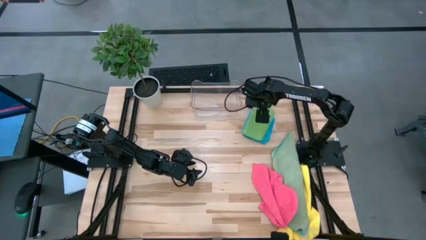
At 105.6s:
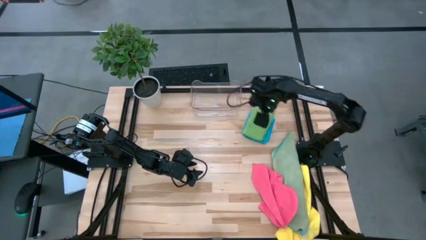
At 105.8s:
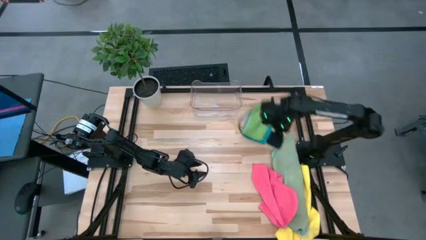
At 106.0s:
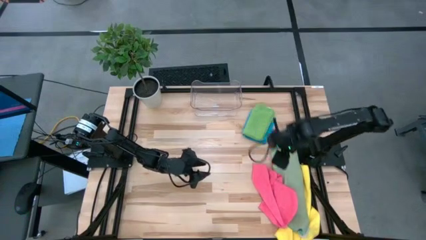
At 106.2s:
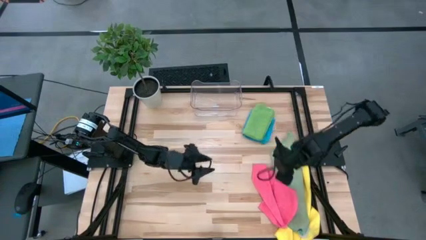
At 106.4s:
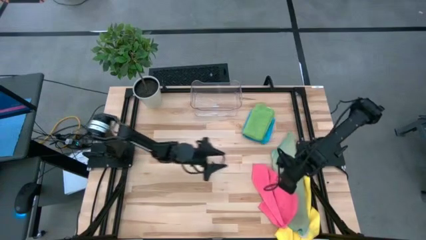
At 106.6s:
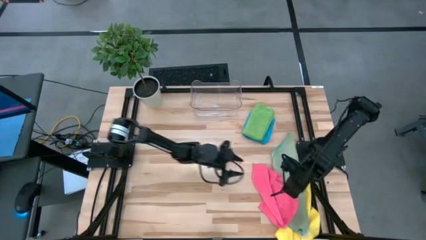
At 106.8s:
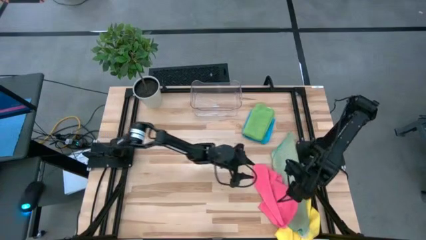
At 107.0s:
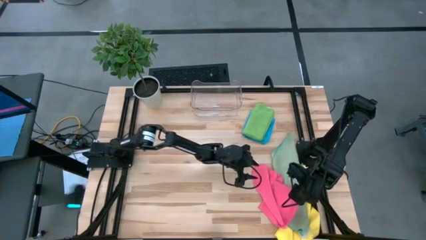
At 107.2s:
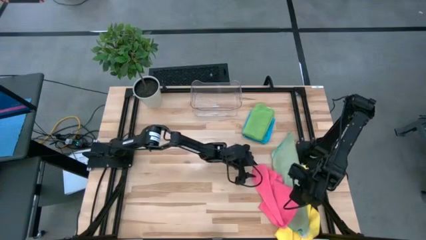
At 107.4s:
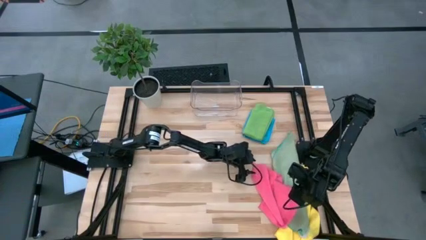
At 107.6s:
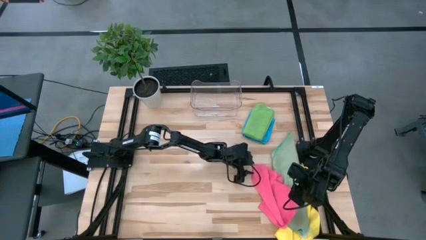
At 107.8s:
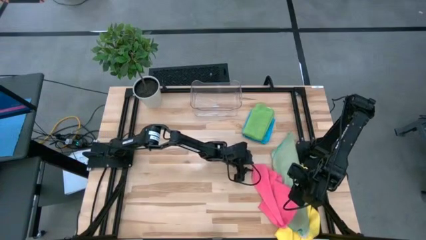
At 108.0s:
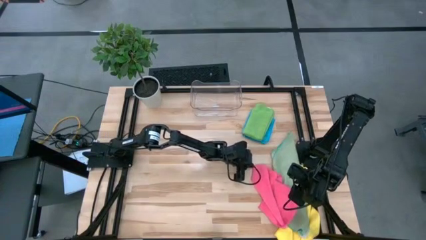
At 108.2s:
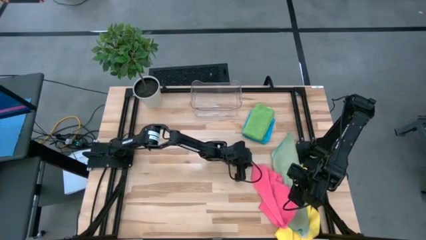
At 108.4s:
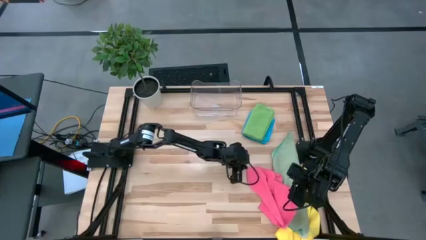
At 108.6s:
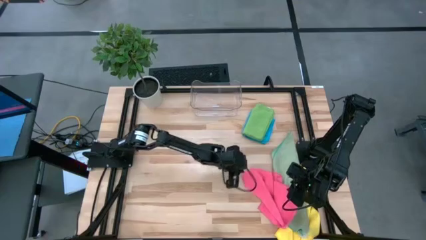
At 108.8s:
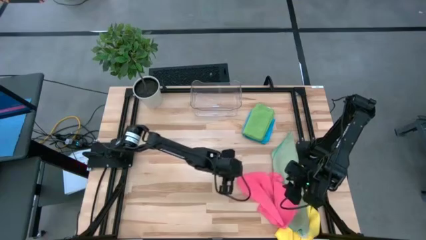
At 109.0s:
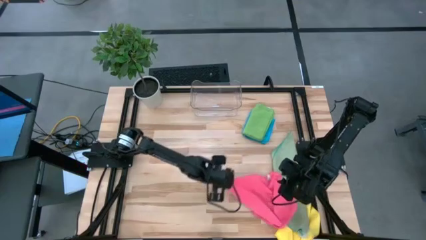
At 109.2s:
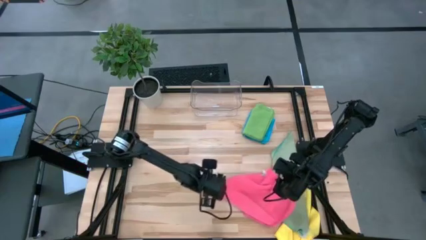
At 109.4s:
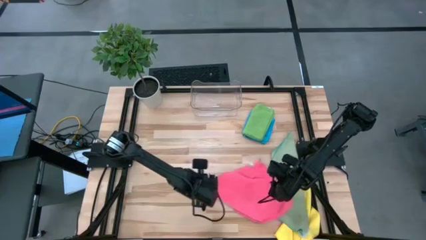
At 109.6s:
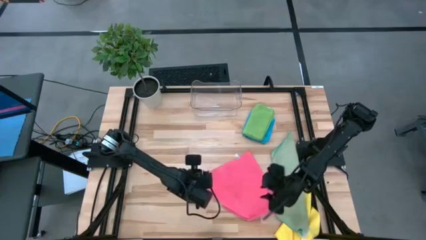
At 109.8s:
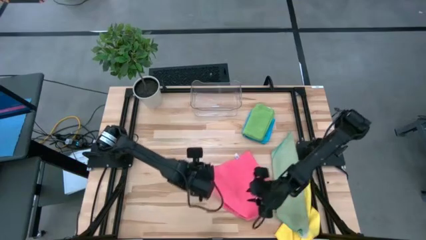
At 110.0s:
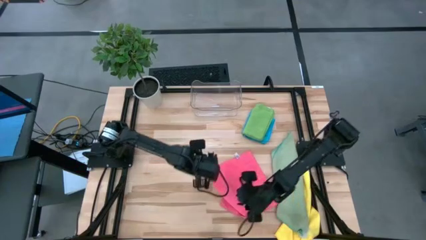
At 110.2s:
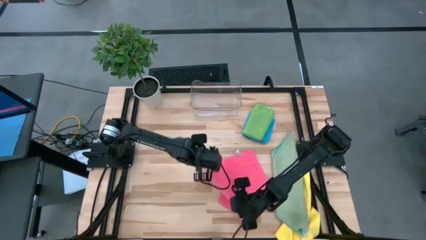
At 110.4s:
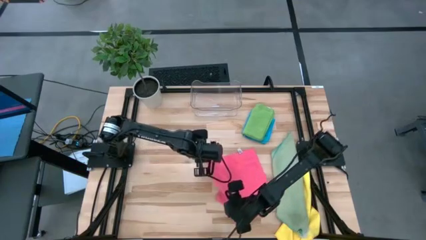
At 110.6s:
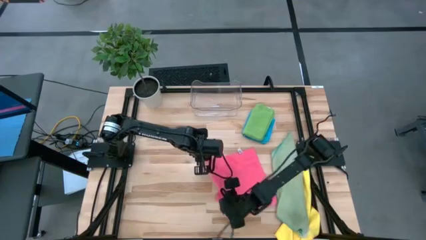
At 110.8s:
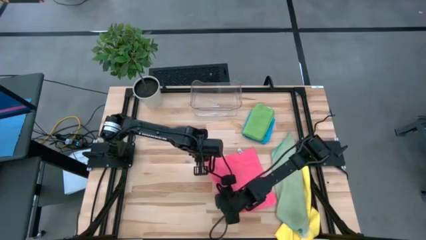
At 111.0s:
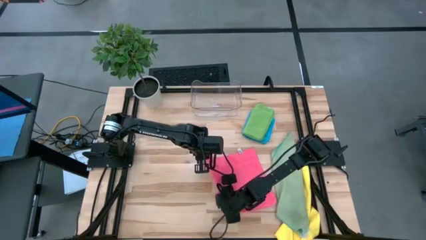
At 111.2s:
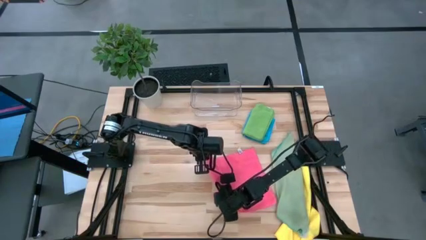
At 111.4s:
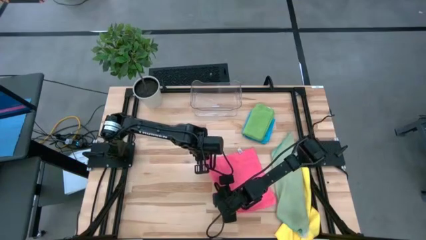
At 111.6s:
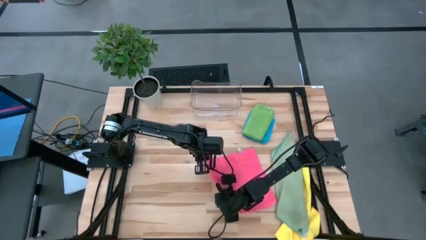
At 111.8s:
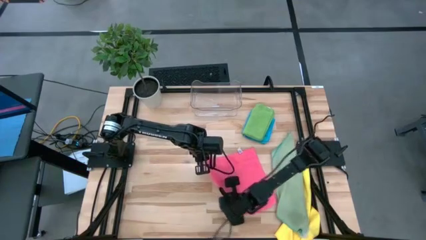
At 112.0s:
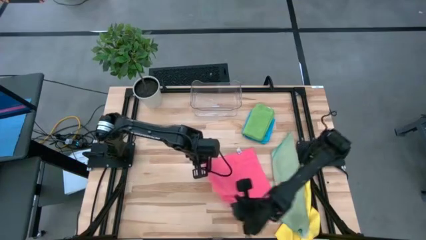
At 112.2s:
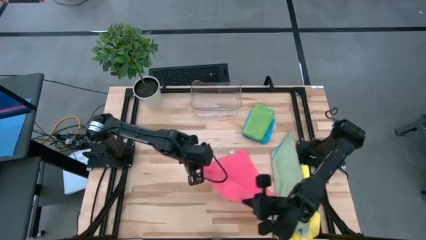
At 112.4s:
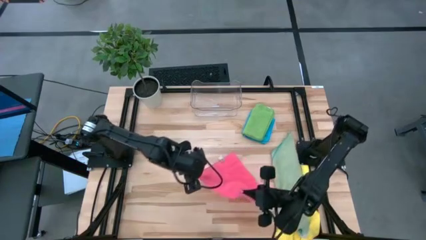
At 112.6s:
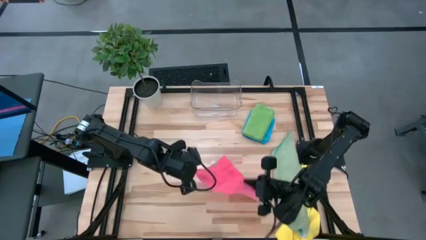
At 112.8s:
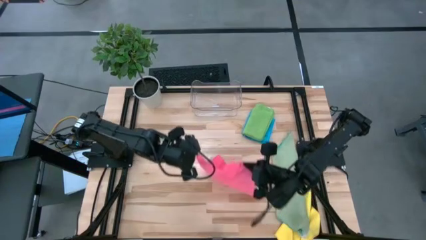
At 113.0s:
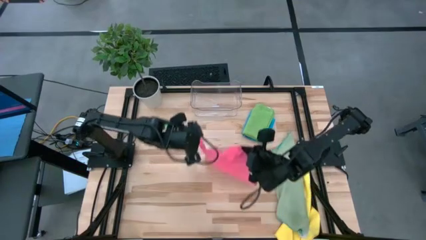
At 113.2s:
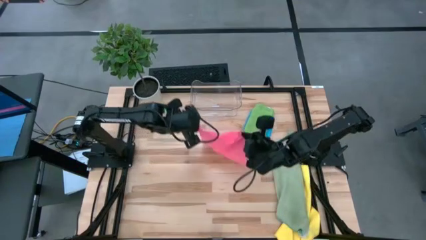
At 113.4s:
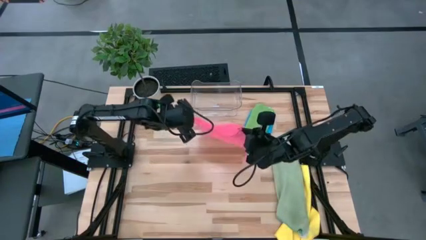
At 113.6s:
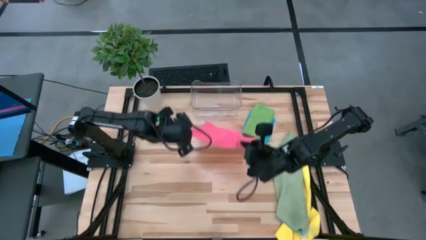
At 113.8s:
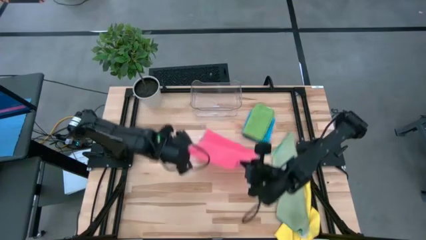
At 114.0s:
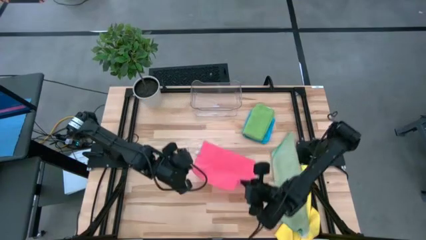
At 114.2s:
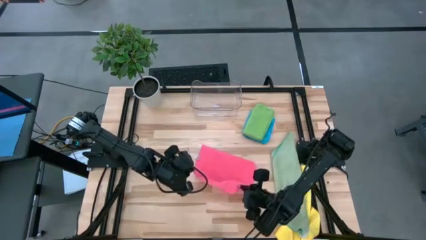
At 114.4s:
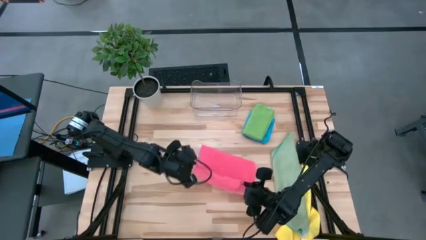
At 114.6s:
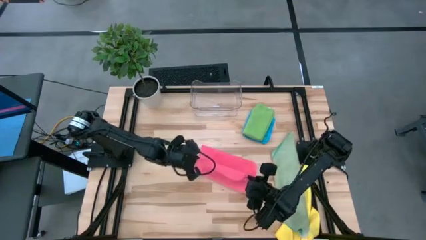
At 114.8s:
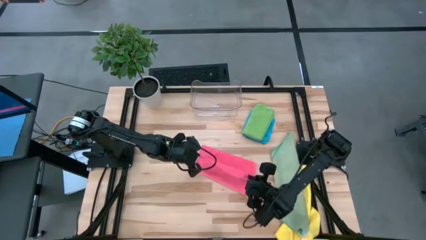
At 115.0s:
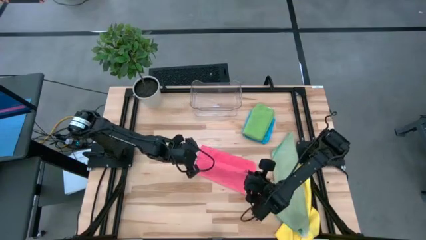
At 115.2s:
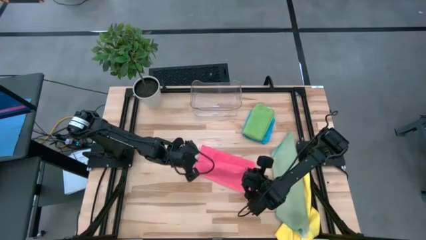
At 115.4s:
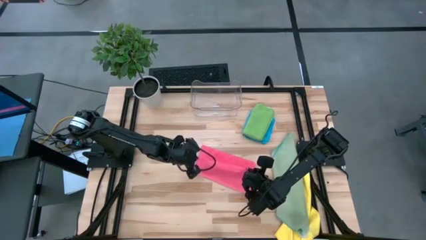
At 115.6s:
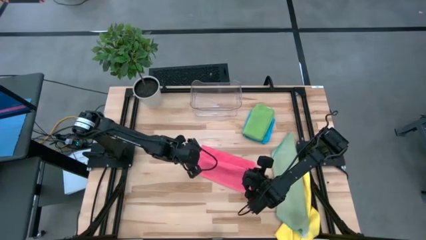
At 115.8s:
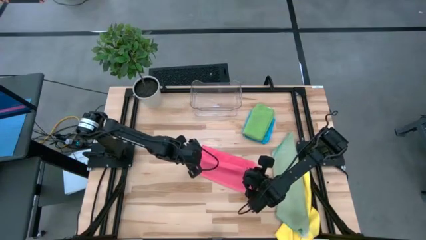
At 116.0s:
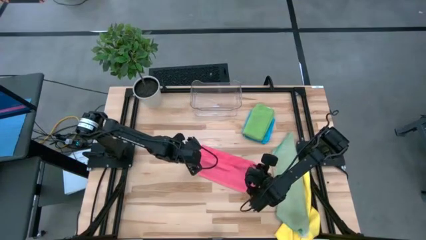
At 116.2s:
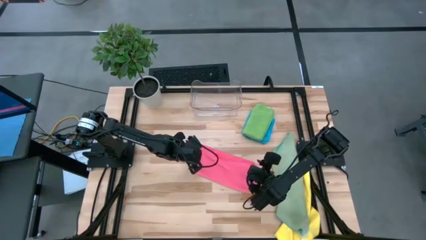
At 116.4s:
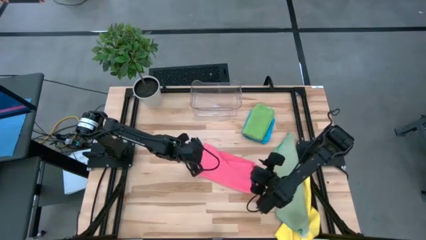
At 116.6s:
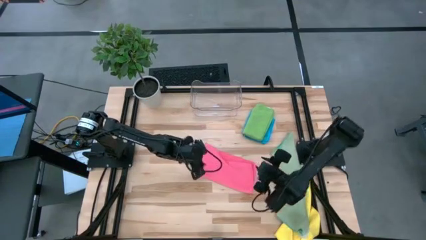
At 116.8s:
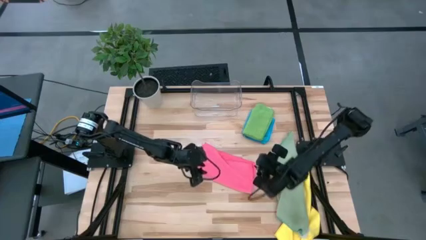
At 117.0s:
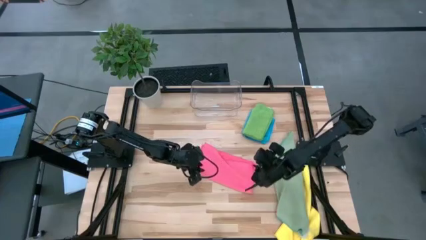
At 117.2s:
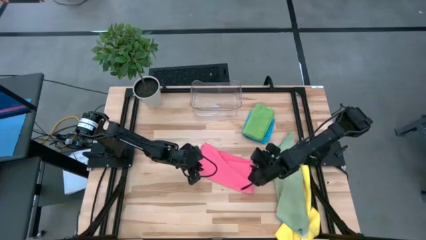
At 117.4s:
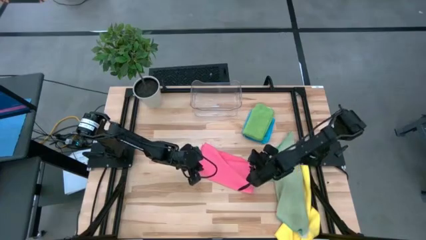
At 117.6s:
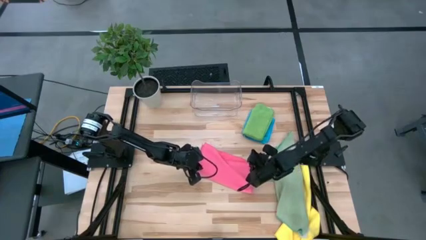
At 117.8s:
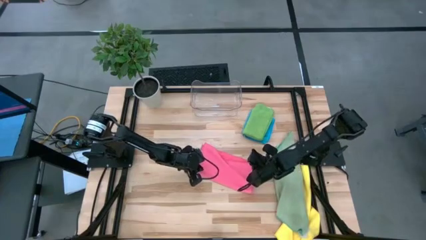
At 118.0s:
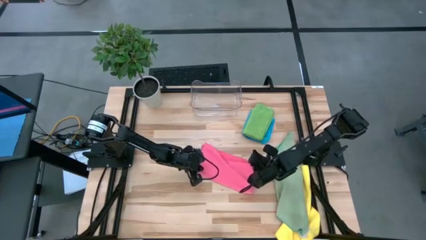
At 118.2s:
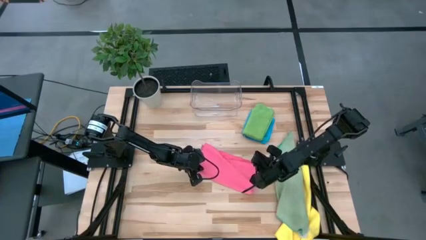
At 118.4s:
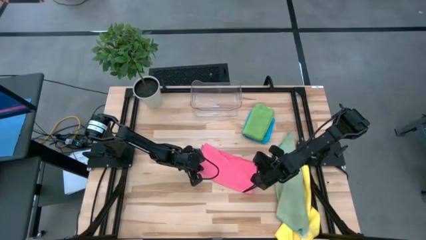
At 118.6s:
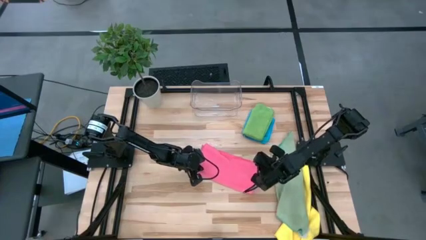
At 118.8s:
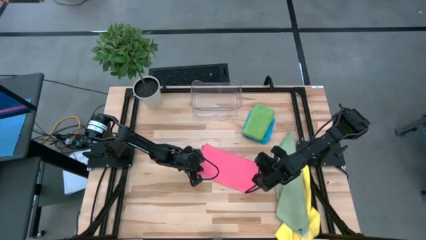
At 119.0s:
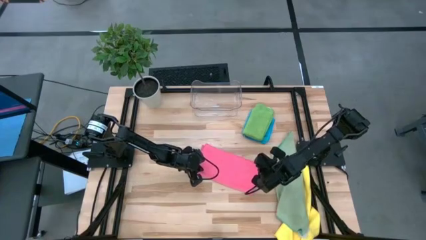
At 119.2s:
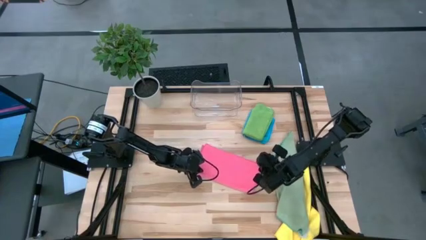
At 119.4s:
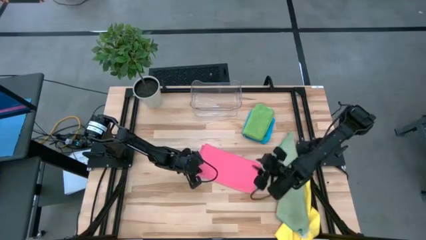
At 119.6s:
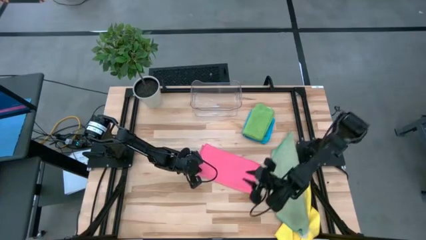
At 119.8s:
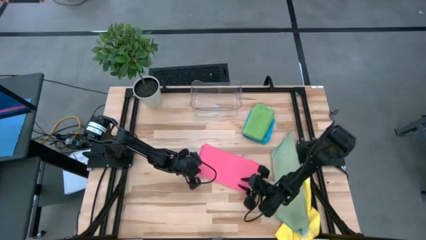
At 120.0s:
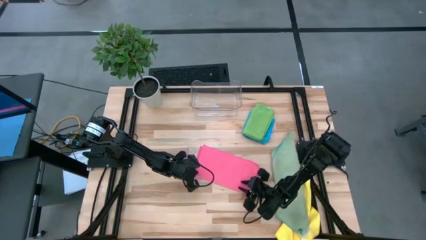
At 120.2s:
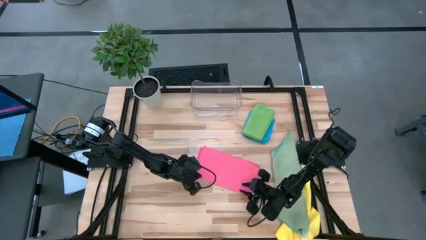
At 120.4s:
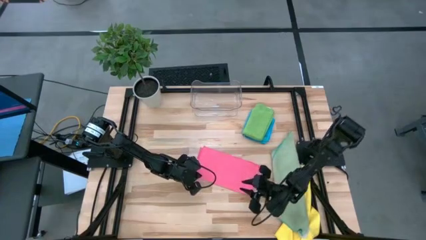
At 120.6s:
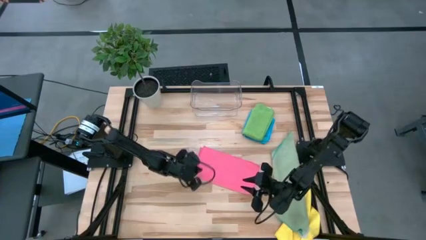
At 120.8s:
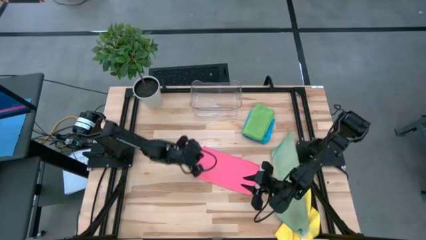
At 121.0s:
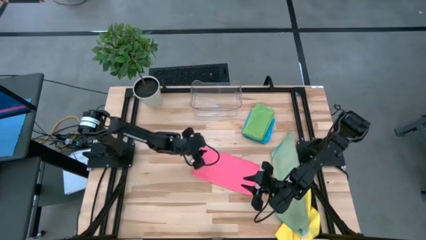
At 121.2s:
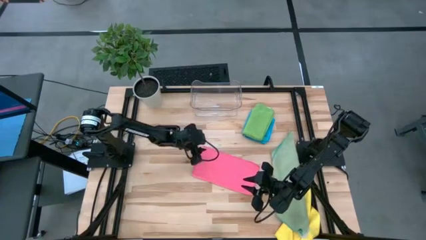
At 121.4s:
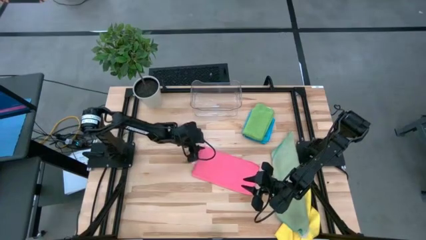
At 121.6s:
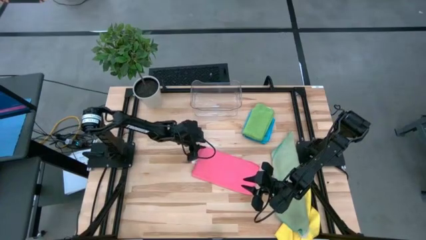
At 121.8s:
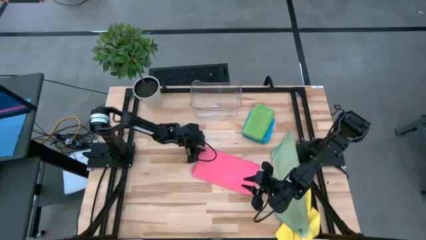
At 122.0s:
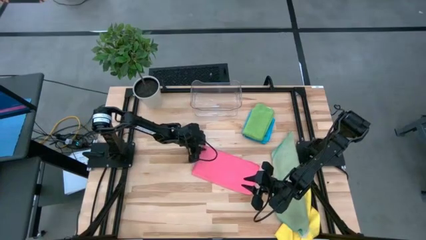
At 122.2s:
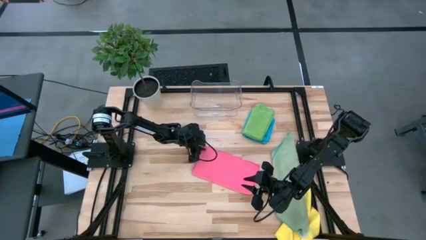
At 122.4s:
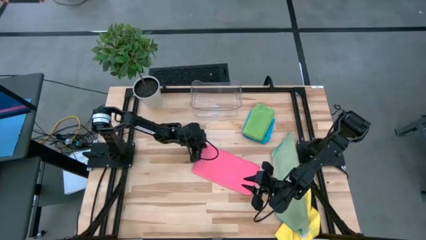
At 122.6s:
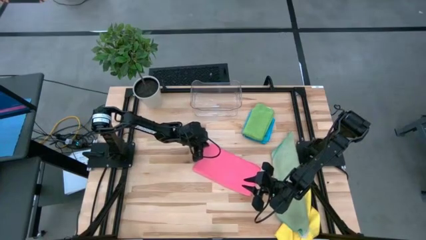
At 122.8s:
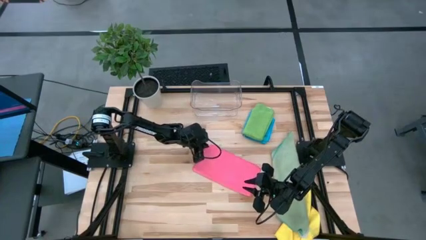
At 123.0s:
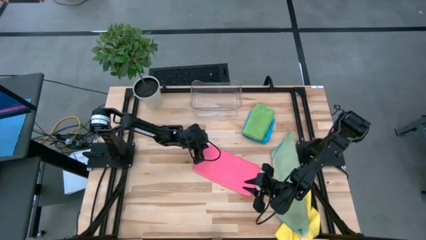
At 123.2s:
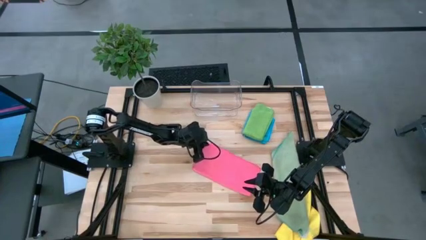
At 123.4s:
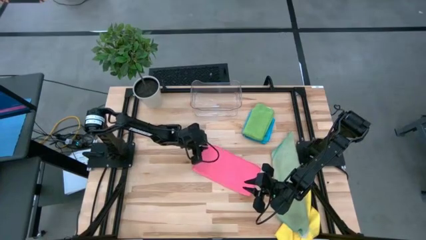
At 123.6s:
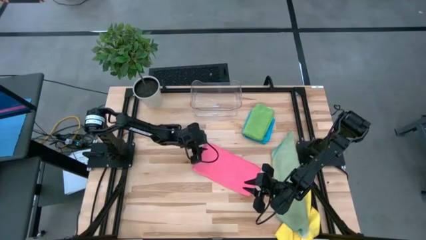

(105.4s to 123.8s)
Task: Fold microfiber towels
Fold pink microfiber towel
